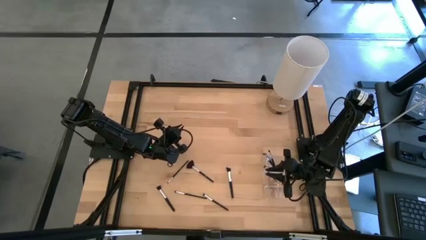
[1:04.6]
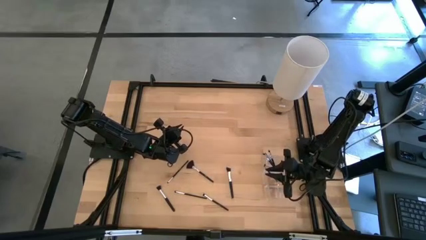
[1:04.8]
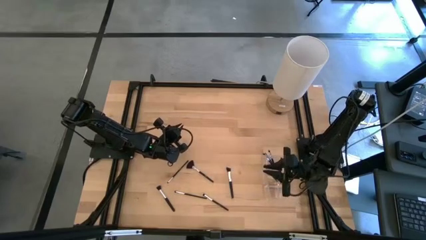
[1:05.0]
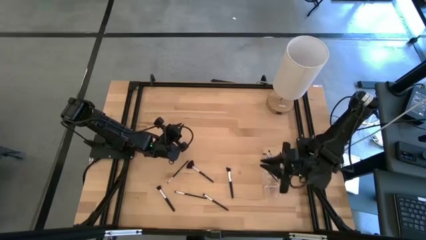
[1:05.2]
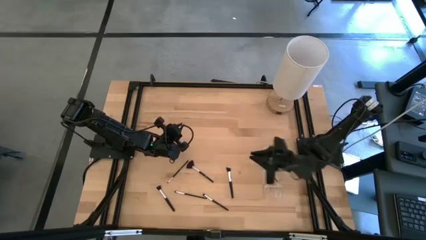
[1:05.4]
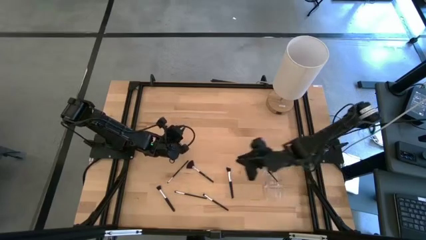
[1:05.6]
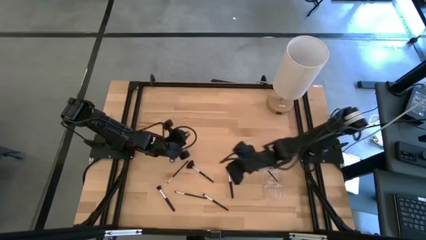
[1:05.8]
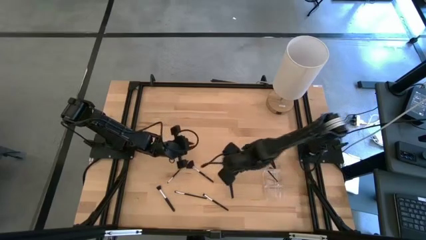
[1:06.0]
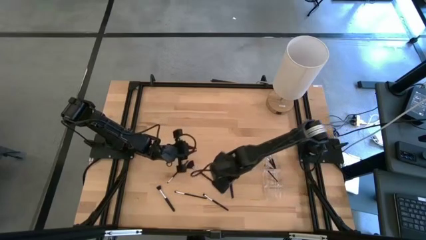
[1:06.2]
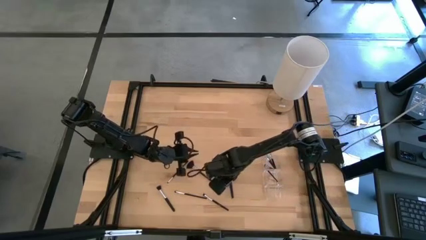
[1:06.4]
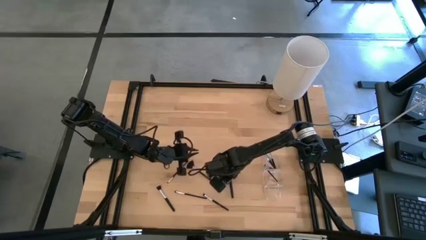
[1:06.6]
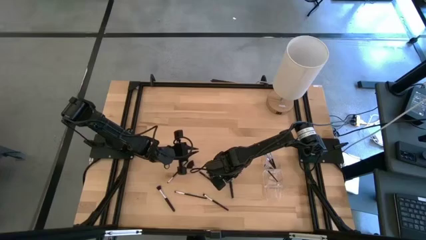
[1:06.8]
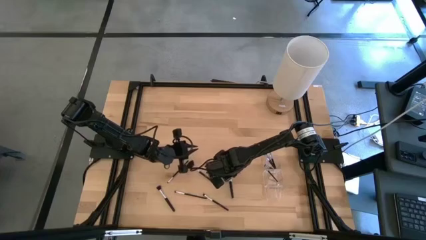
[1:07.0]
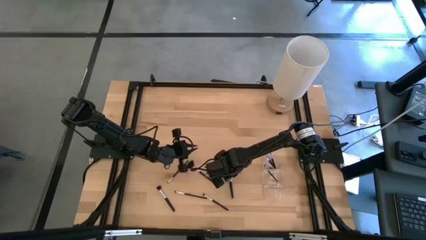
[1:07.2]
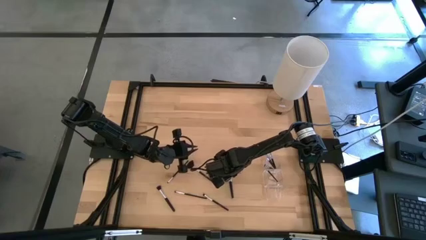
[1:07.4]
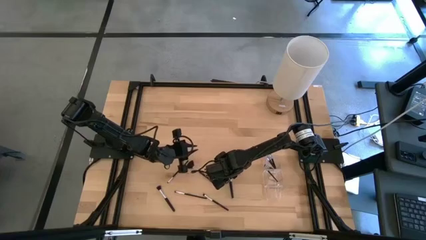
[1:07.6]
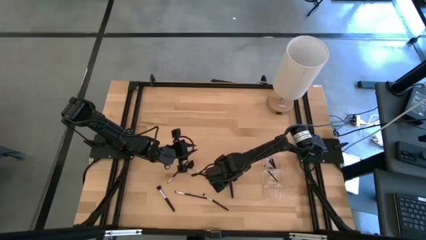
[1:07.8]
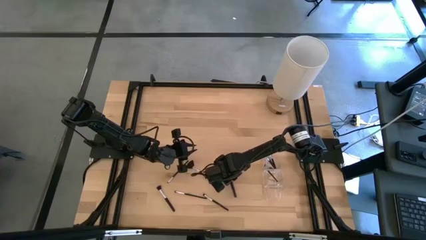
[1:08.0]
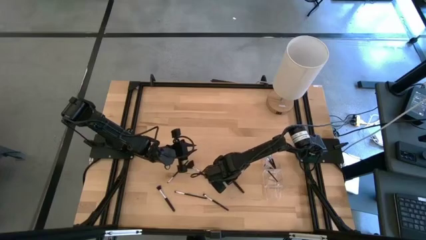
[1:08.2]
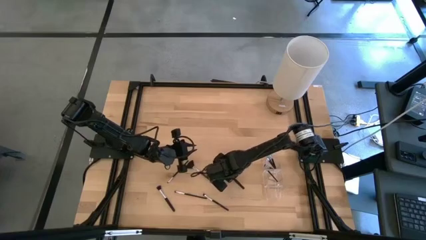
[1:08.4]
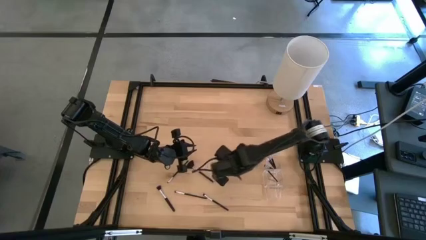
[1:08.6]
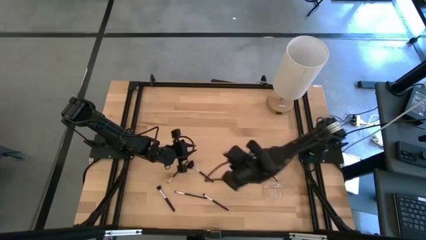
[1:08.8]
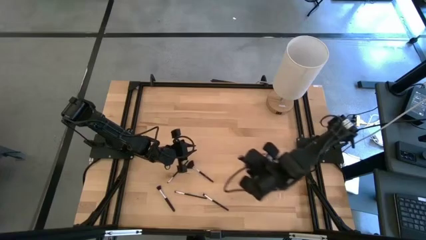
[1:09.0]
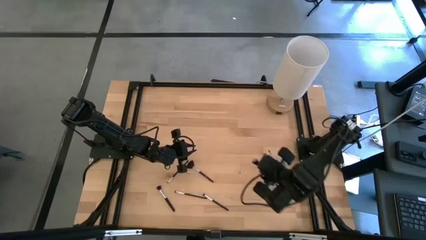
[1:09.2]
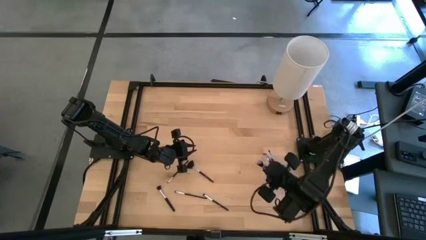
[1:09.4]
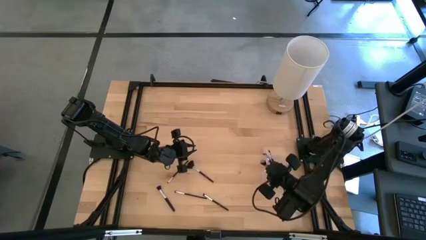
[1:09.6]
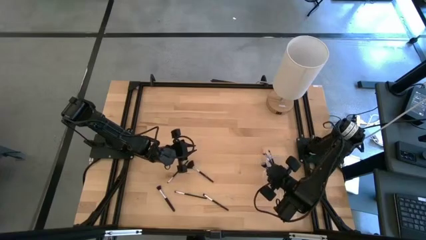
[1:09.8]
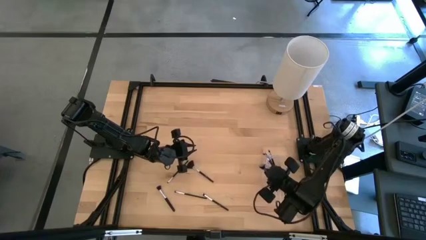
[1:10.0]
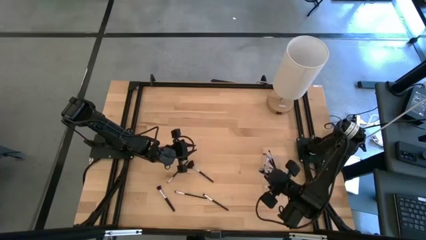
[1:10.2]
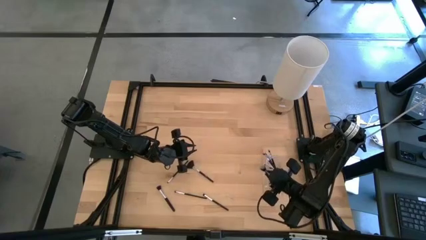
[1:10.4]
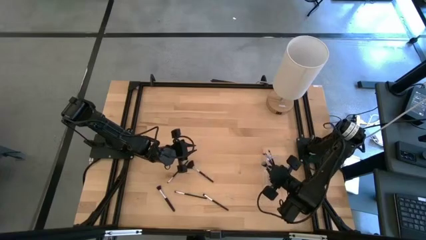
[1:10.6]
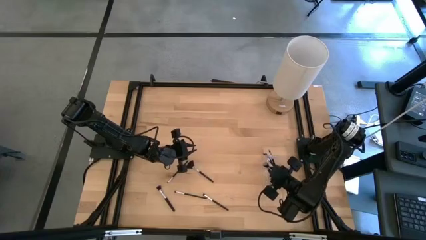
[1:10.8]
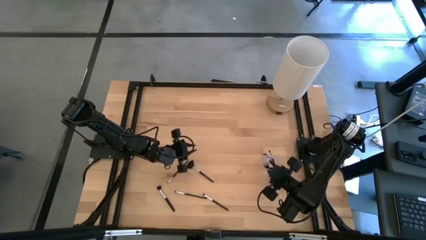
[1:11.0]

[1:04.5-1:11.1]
Task: Put items in baskets/containers
Put the right powder brush into the middle section of the transparent organizer

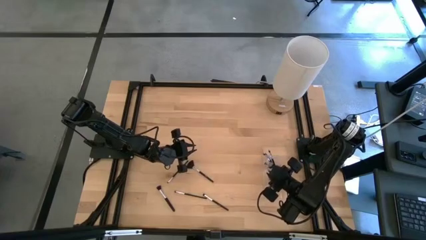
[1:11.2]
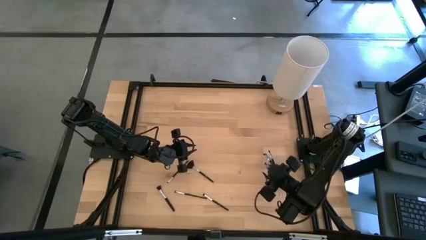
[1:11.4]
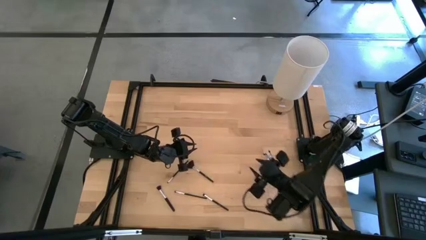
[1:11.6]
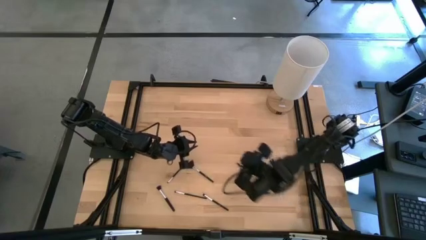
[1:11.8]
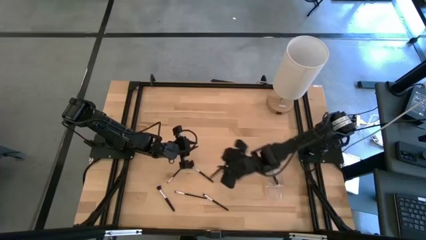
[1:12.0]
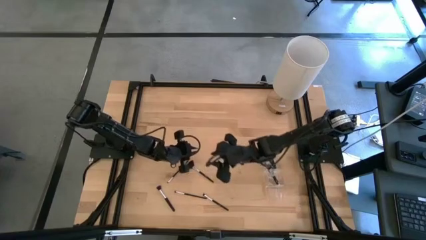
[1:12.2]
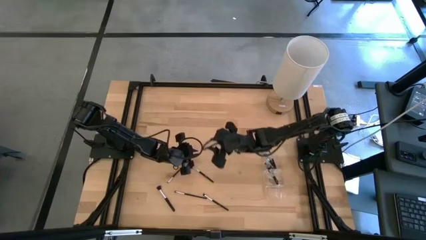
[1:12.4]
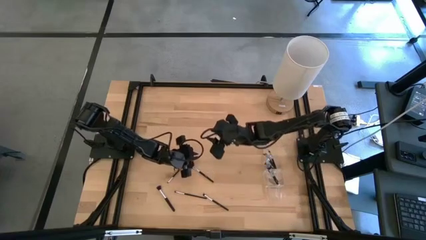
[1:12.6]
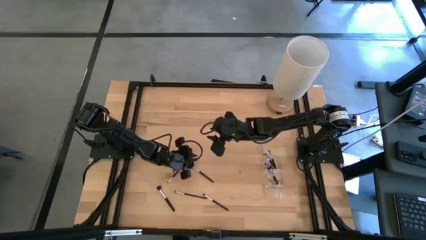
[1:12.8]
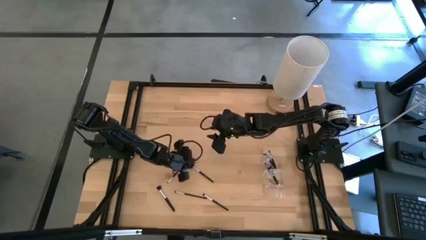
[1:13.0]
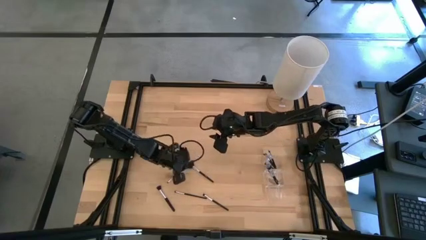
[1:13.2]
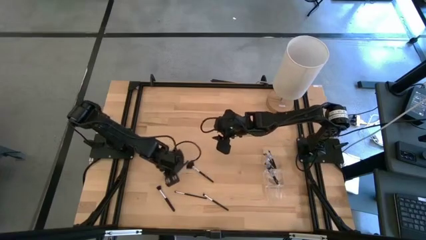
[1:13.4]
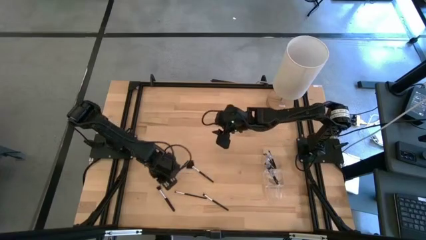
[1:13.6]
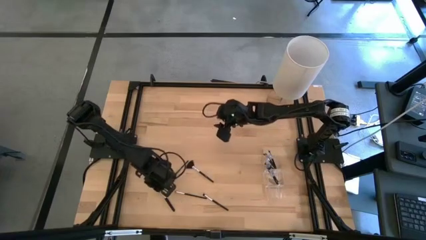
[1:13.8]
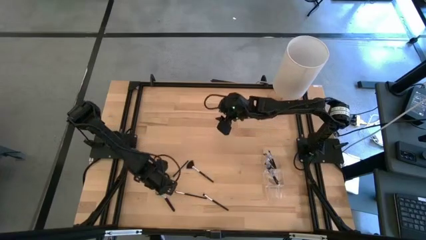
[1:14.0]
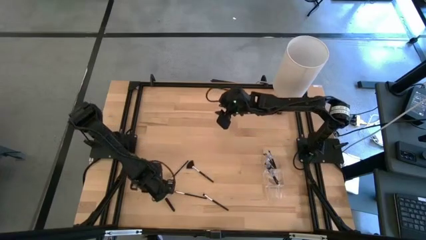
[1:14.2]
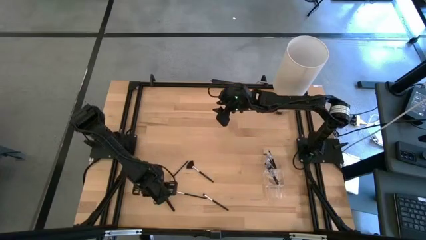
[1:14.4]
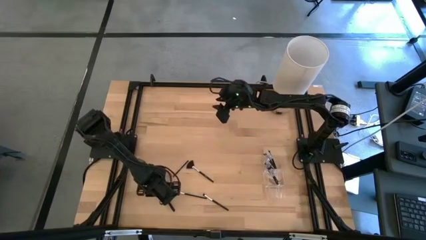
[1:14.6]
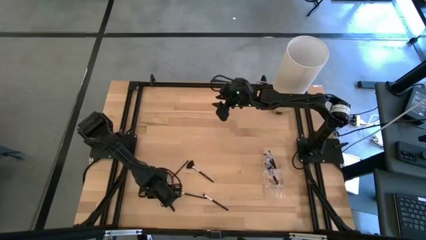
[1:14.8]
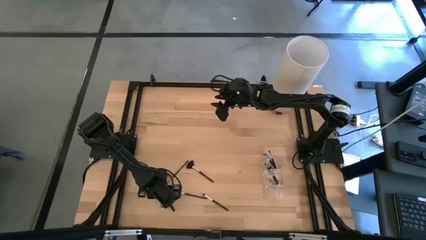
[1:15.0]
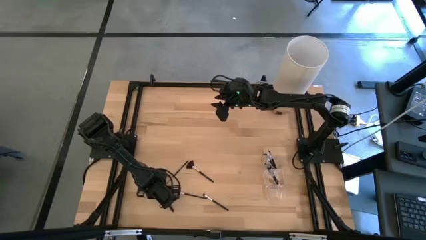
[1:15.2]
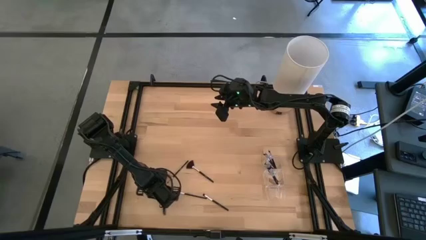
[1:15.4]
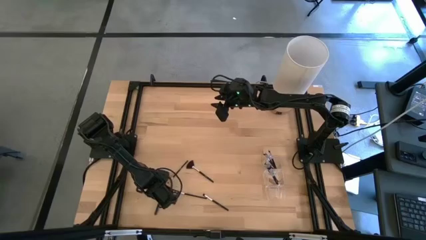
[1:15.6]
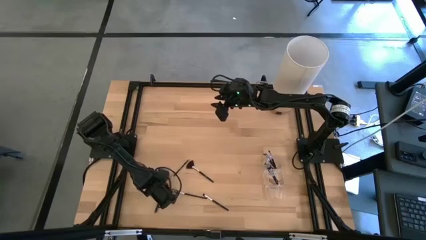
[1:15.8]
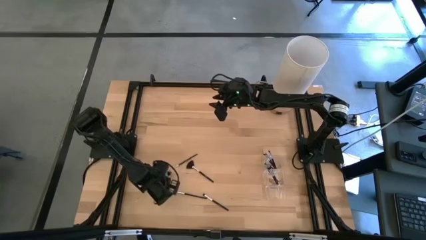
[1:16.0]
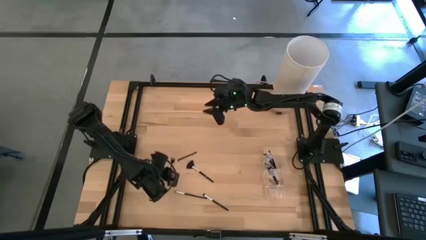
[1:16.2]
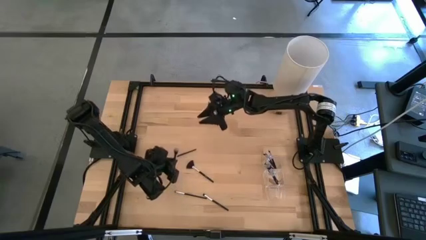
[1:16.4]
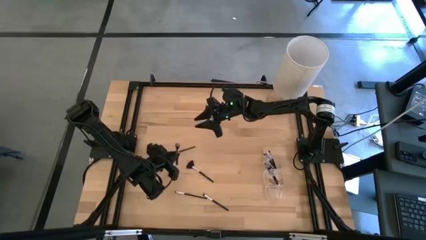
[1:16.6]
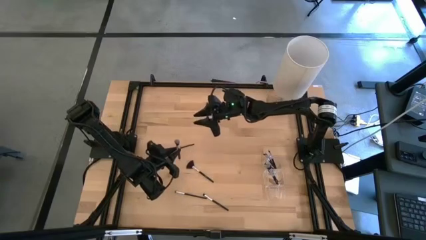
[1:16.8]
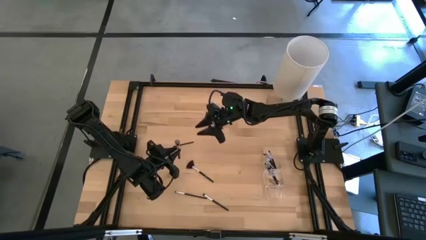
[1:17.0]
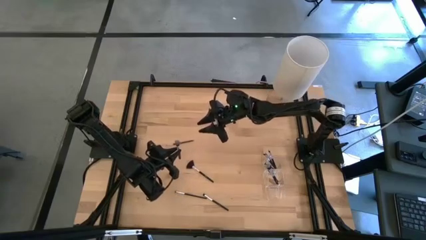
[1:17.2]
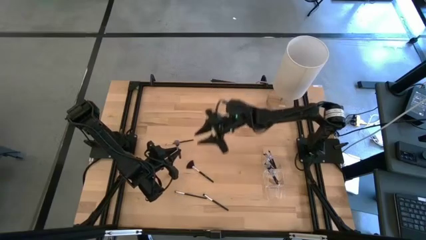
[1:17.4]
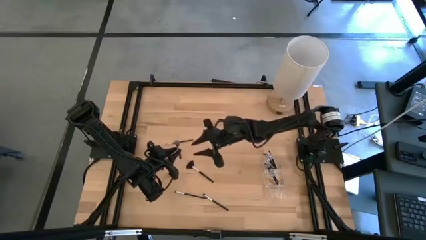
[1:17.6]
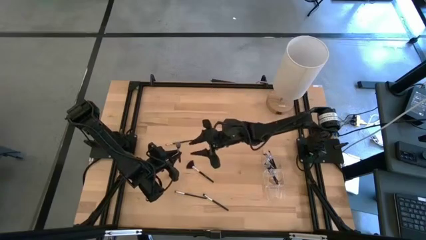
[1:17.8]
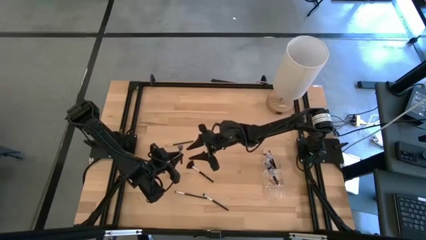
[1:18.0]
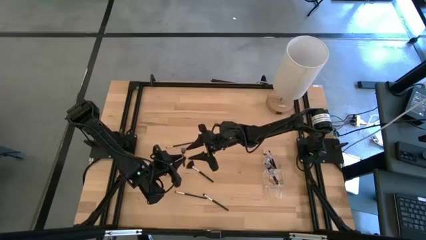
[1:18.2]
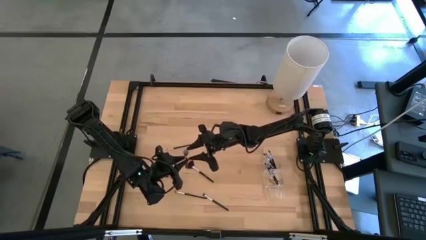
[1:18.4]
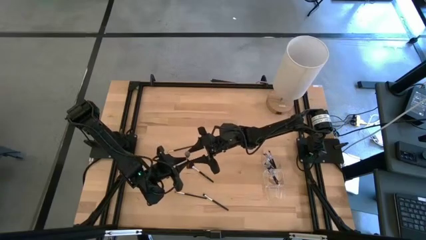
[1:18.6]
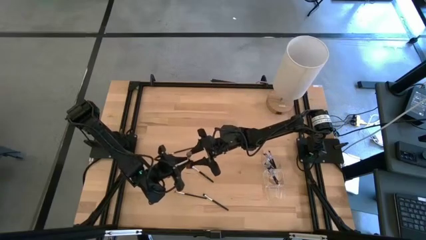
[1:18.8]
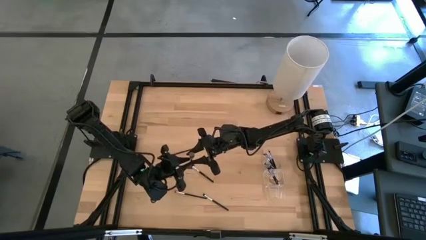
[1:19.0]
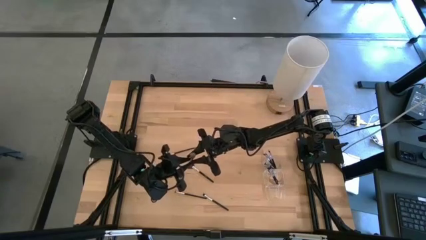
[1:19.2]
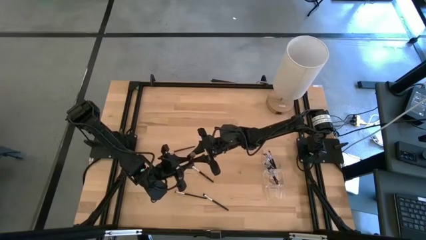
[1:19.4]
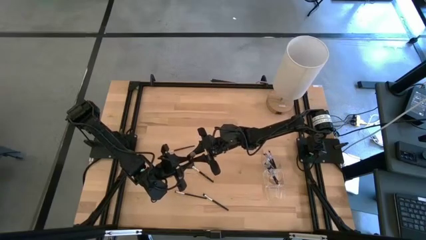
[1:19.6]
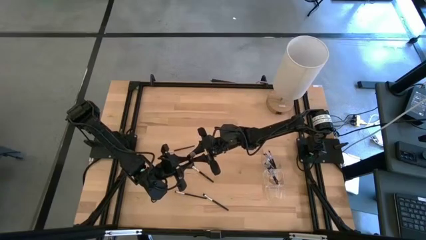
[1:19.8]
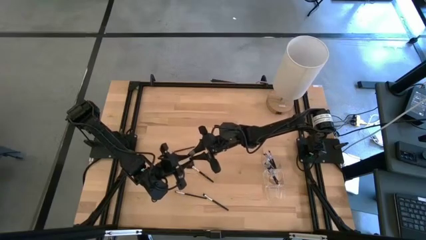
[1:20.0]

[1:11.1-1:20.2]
Put the powder brush into the middle section of the transparent organizer
